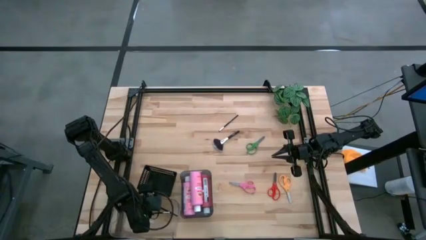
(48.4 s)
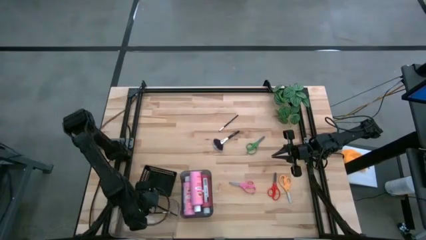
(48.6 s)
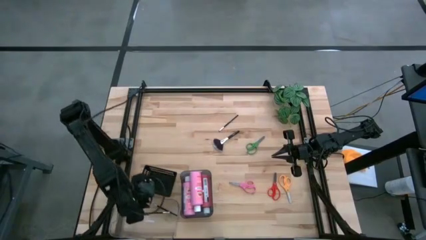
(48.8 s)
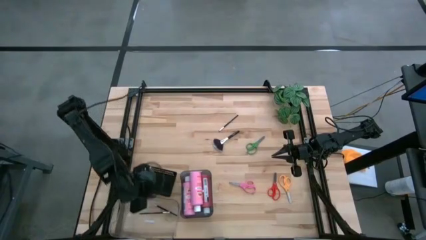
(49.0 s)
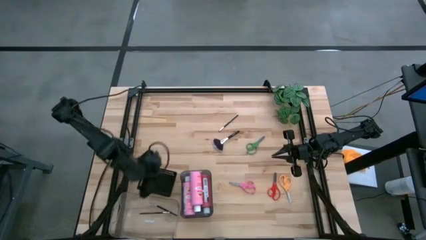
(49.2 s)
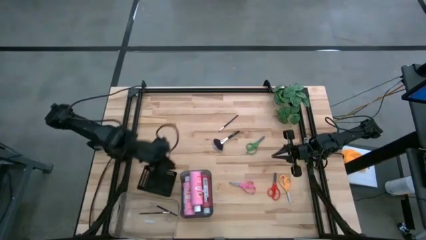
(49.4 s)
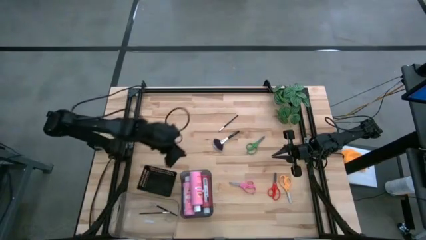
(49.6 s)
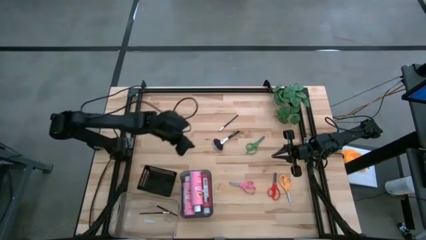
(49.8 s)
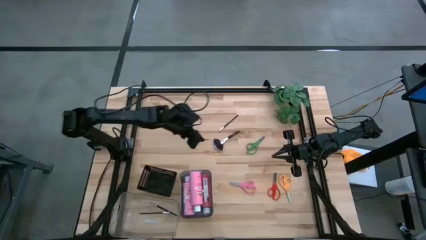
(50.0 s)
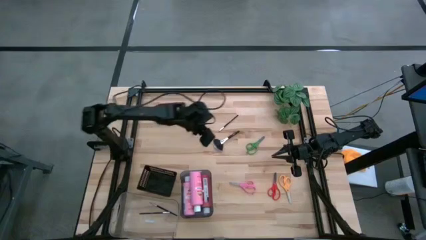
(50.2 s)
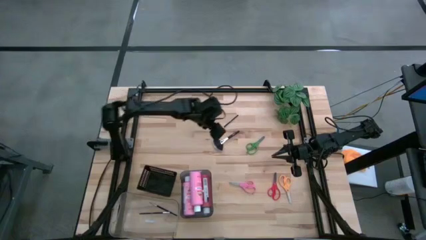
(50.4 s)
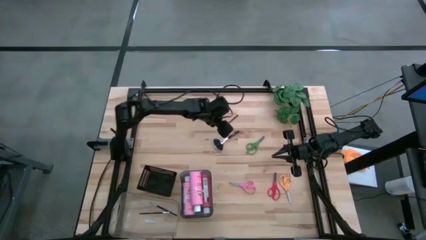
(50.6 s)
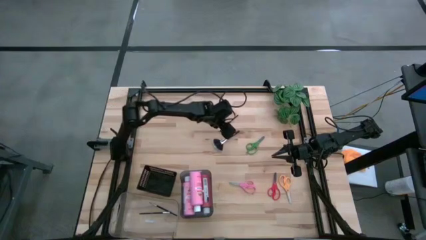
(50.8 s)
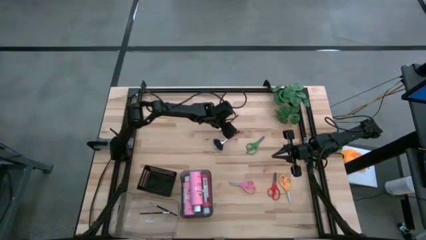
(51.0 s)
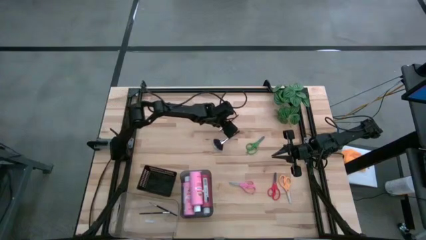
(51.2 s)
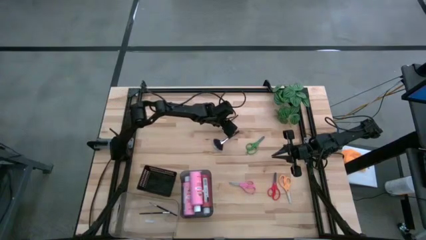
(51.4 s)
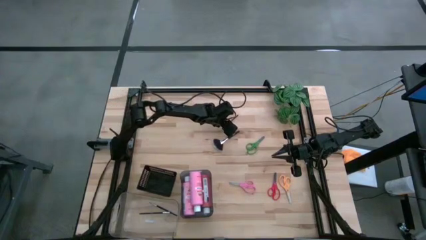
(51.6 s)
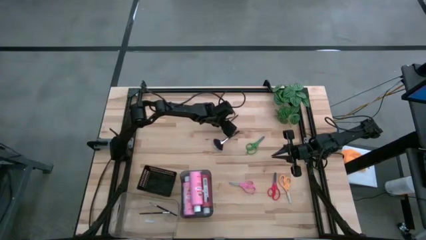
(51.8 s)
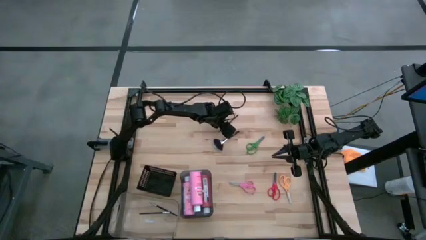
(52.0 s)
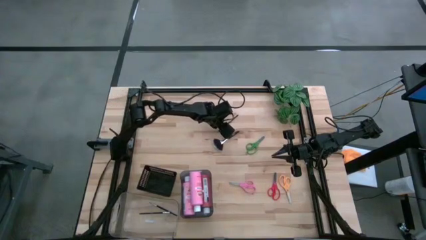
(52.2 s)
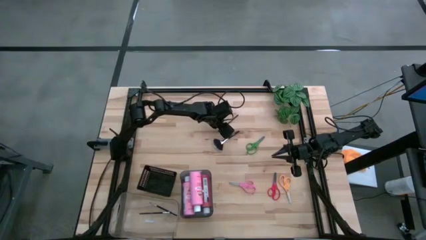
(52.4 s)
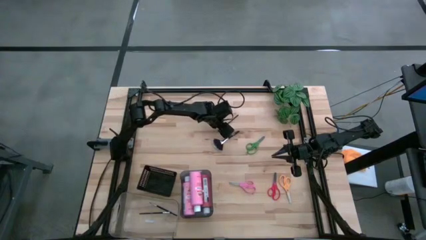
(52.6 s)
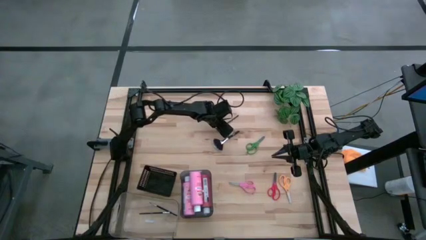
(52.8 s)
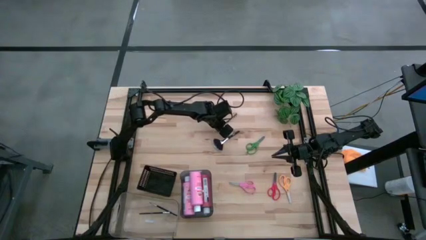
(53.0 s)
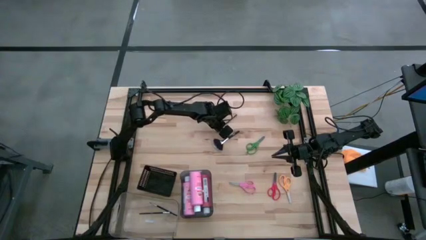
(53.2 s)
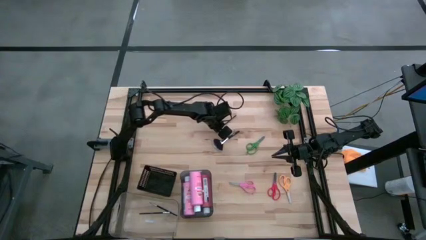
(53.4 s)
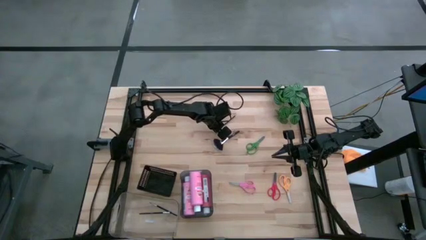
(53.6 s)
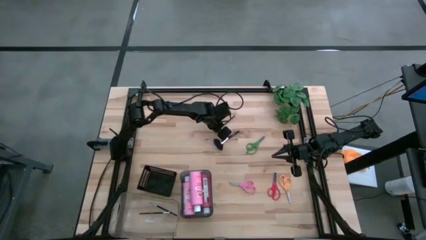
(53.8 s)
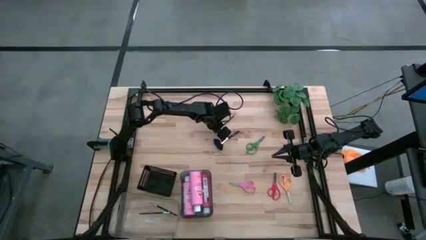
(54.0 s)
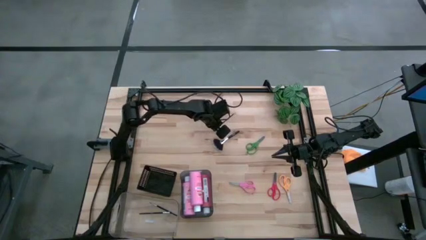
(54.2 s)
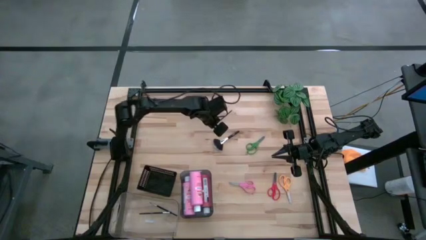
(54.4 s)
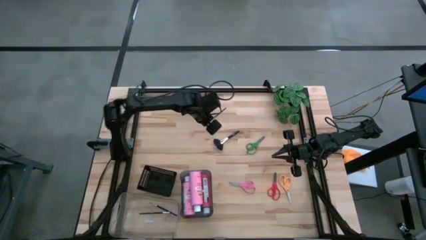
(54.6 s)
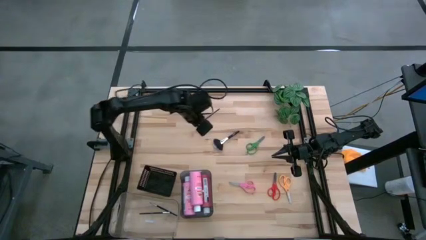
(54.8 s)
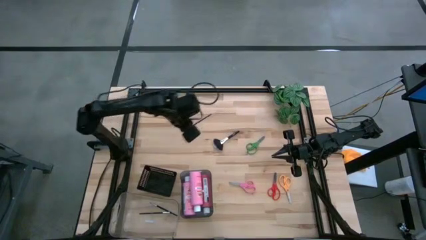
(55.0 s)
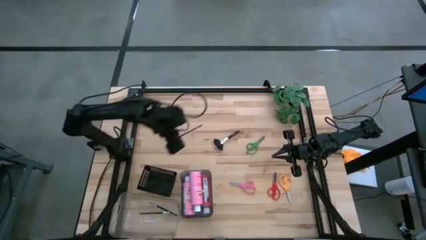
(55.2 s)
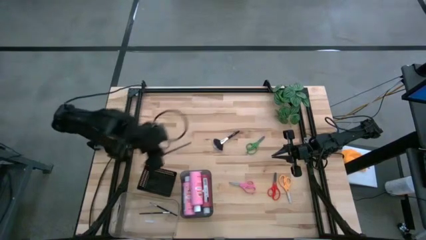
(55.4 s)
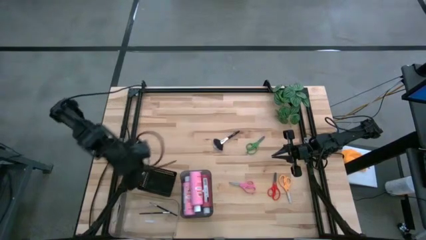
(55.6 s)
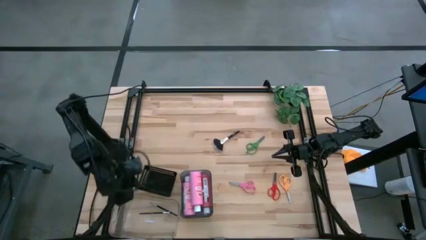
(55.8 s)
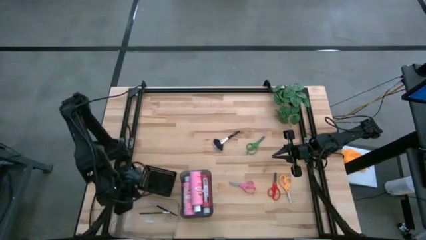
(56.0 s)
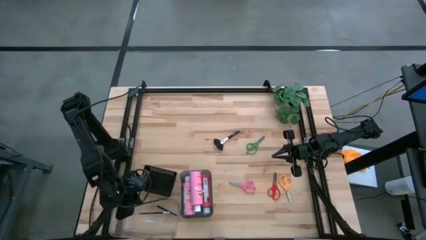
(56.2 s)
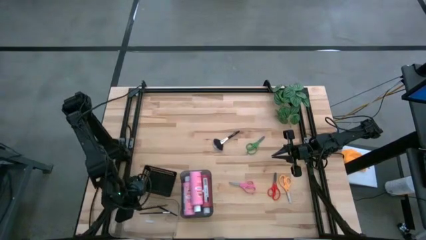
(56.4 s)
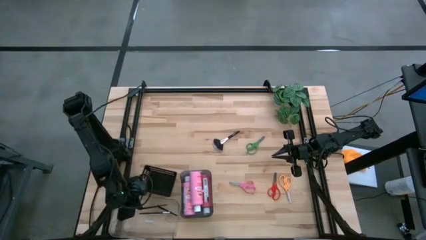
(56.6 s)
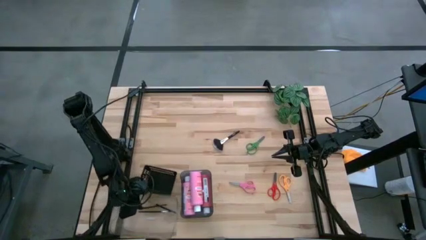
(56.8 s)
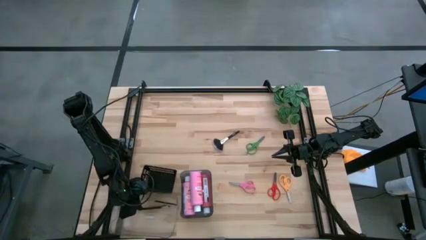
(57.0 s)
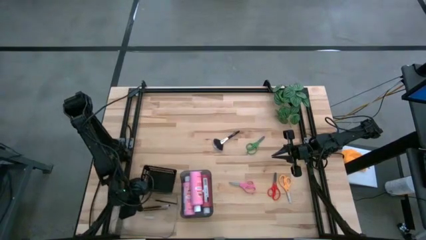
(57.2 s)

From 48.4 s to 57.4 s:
Task: Pick & Place Paint Supplies
Put the eyeshadow brush into the transparent bin

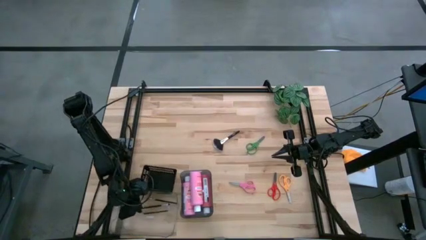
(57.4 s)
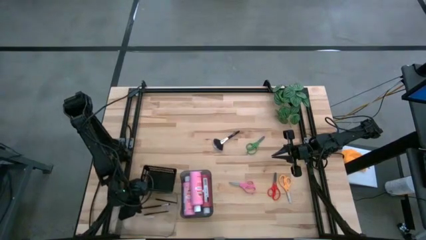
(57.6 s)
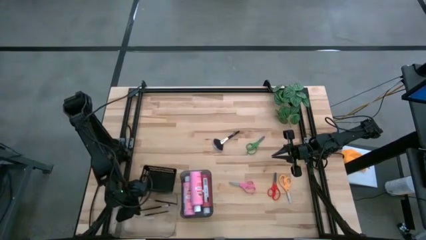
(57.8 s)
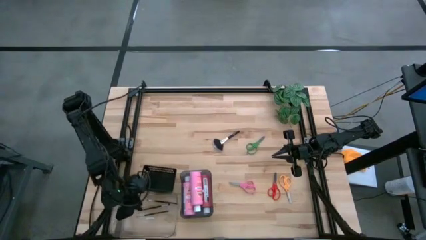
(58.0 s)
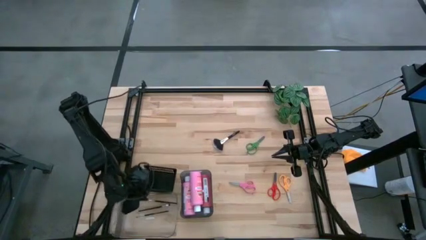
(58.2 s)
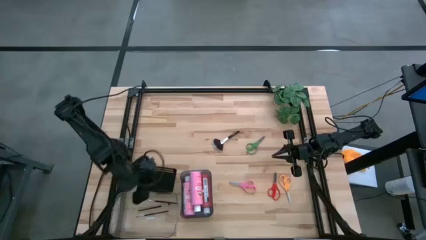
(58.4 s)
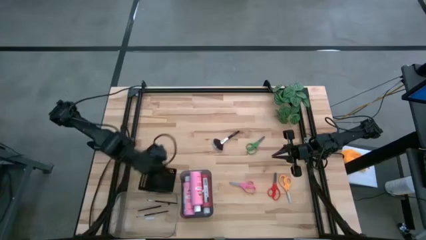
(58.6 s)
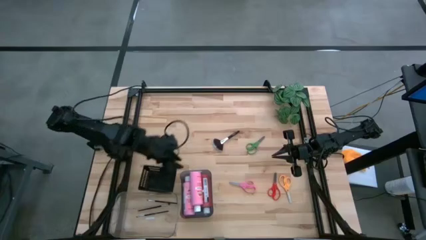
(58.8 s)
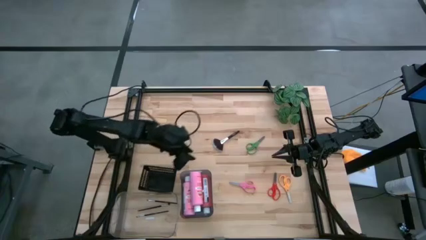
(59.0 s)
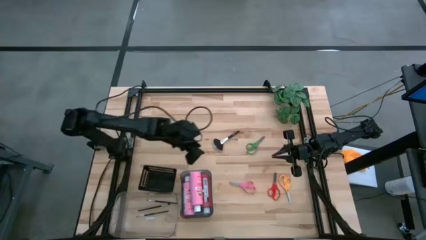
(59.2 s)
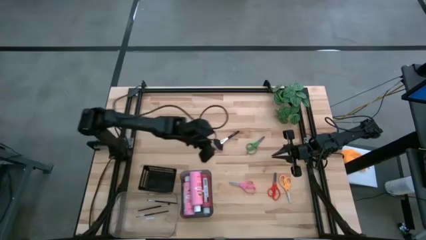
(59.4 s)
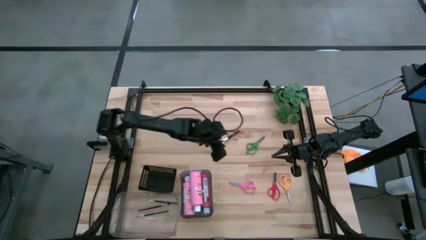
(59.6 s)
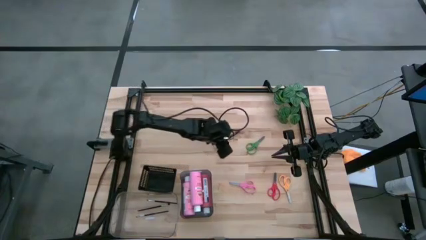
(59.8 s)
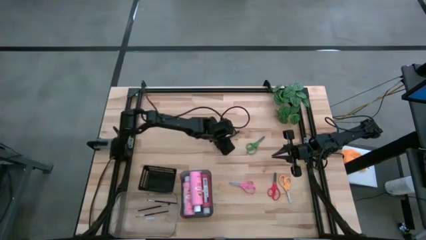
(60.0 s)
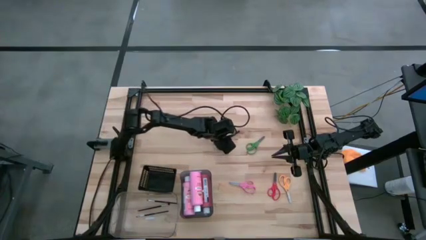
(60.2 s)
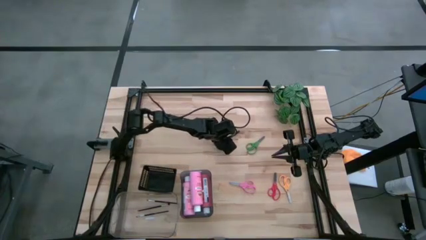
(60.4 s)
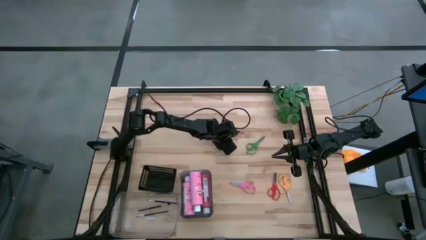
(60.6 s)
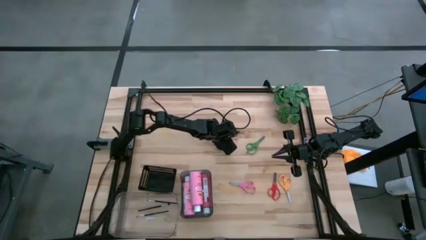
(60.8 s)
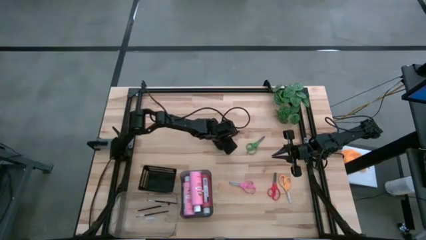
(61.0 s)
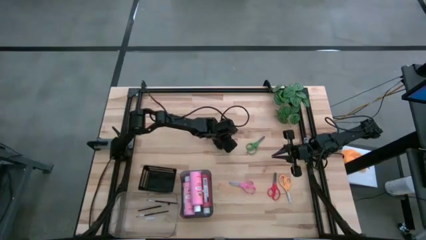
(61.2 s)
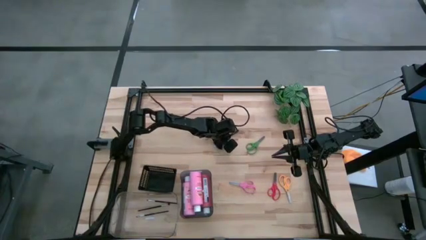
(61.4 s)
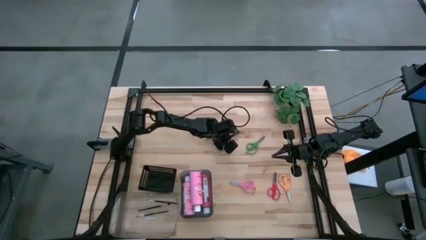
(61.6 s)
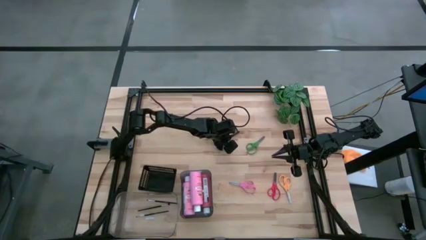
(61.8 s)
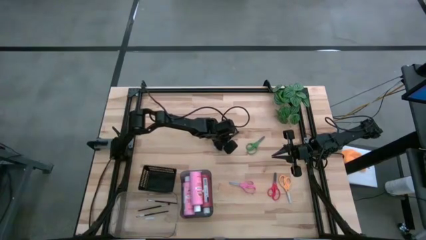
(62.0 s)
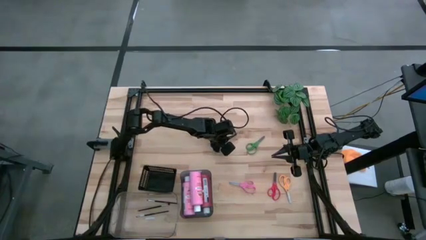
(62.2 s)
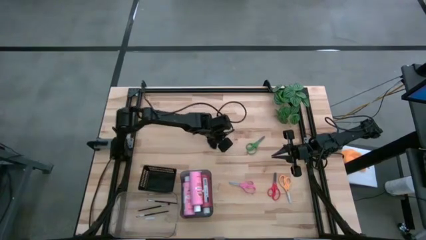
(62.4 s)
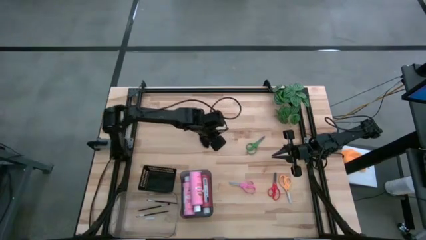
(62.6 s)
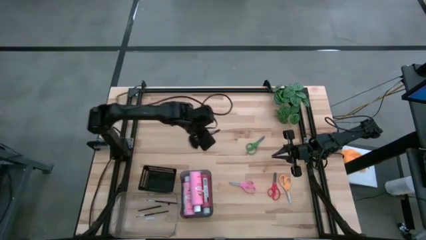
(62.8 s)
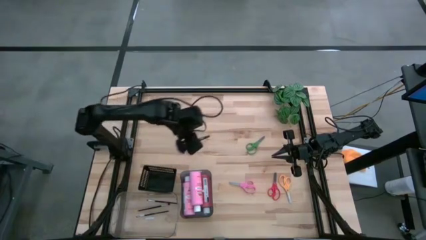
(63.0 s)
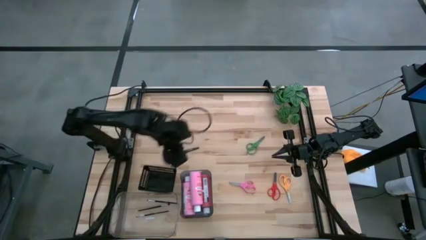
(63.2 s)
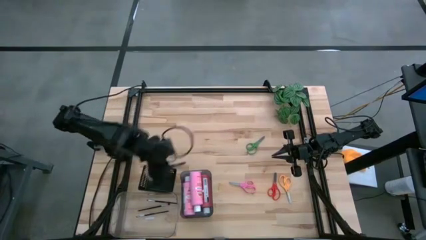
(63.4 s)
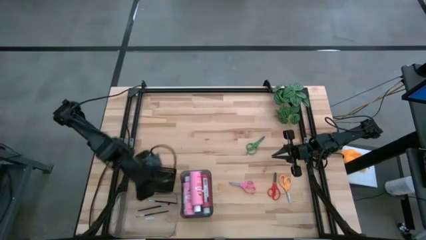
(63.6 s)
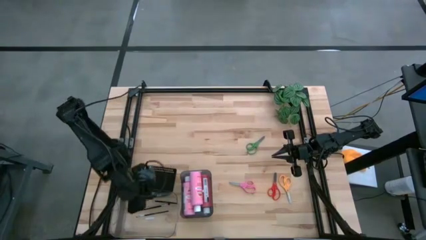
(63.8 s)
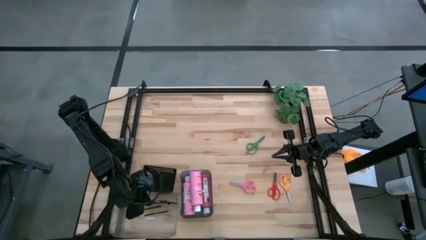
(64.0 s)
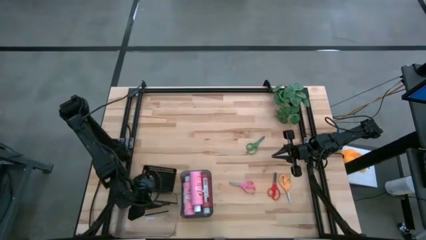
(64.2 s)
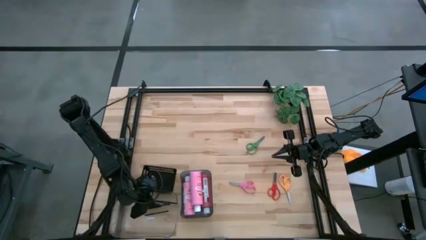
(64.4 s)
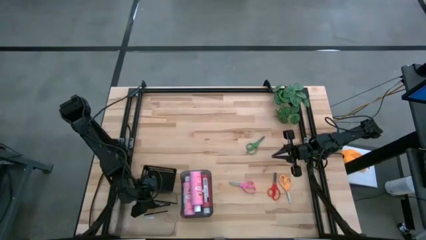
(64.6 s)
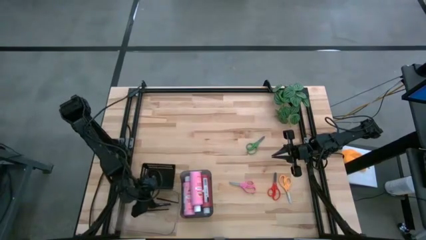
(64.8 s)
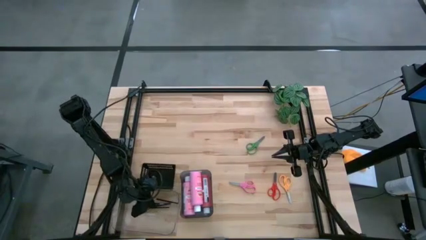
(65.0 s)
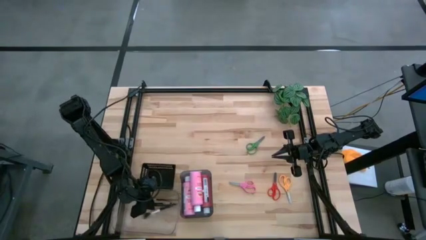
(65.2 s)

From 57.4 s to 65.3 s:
Put the highlighter brush into the transparent bin
